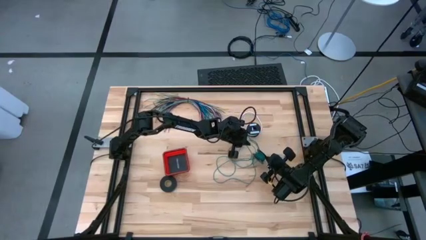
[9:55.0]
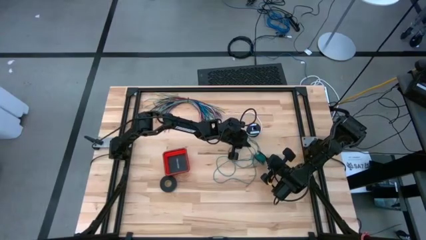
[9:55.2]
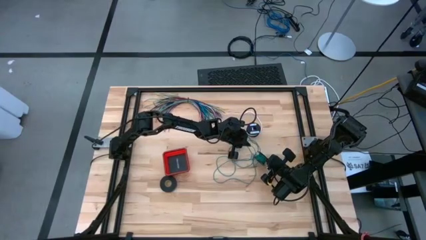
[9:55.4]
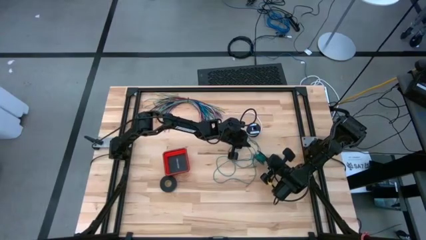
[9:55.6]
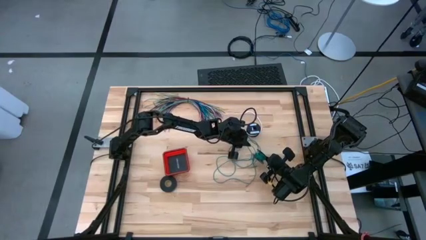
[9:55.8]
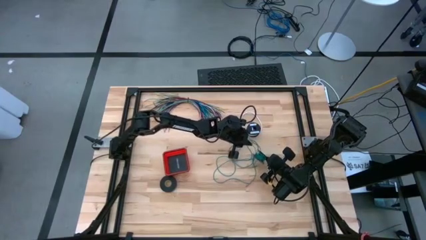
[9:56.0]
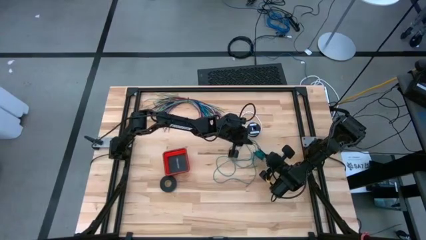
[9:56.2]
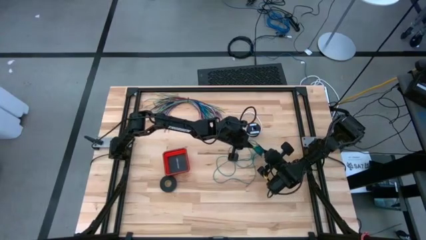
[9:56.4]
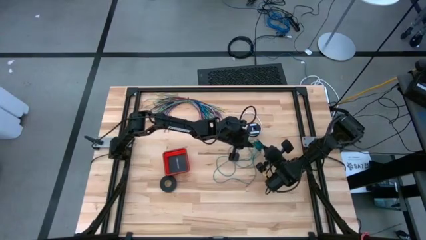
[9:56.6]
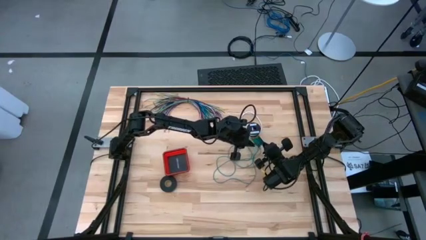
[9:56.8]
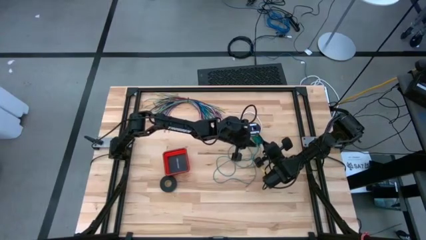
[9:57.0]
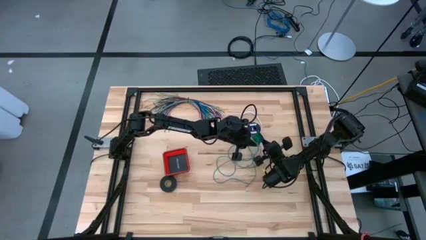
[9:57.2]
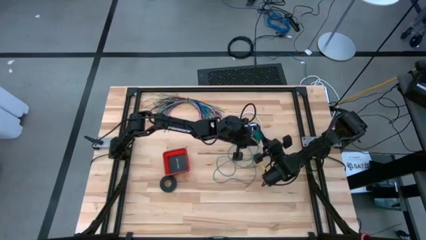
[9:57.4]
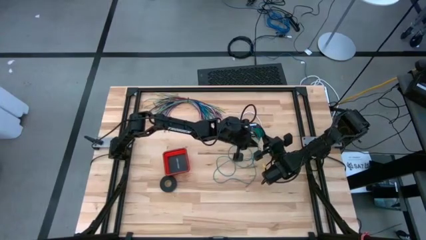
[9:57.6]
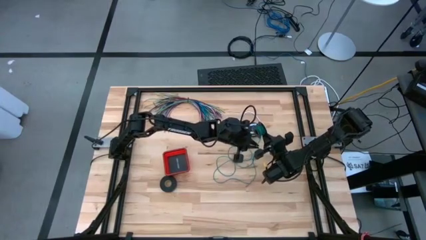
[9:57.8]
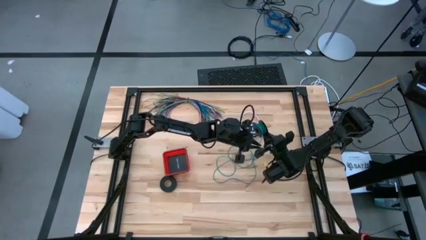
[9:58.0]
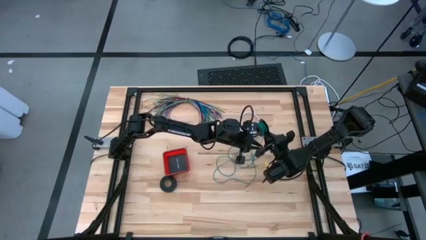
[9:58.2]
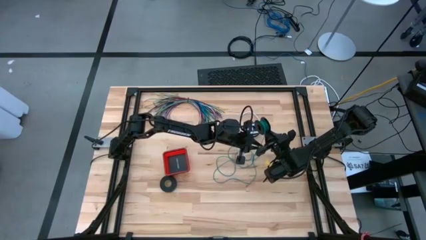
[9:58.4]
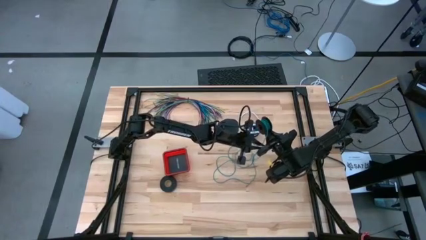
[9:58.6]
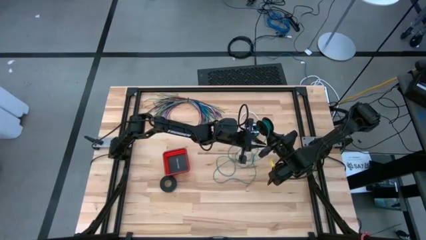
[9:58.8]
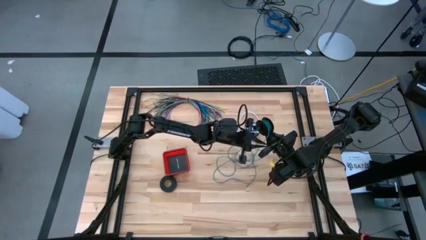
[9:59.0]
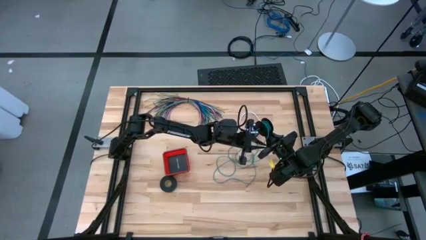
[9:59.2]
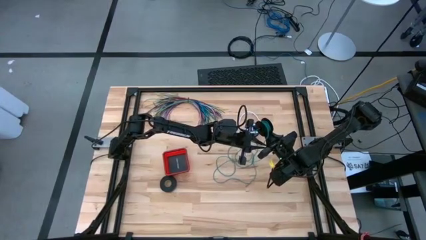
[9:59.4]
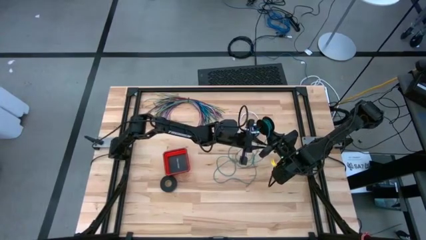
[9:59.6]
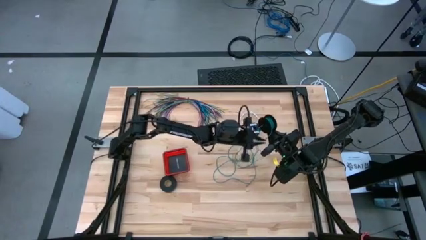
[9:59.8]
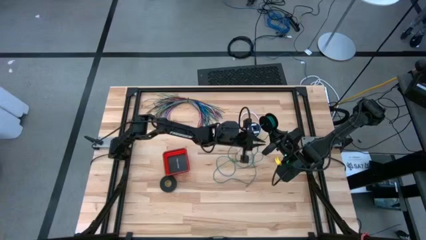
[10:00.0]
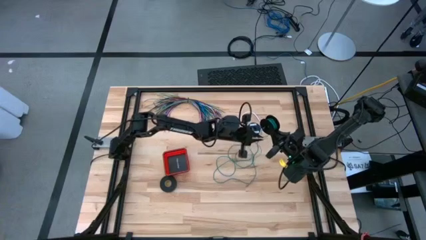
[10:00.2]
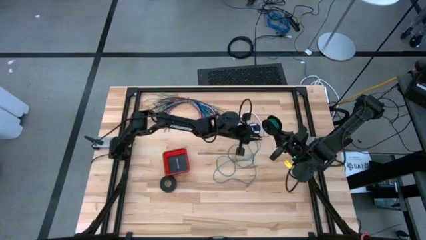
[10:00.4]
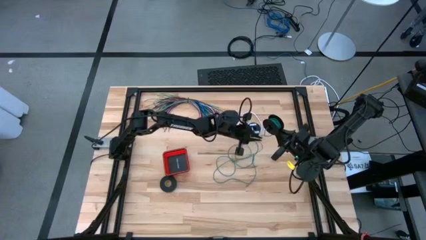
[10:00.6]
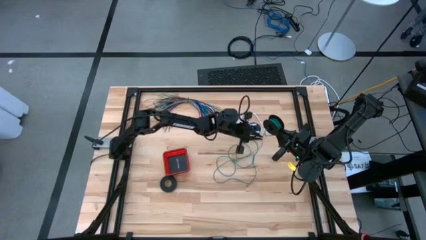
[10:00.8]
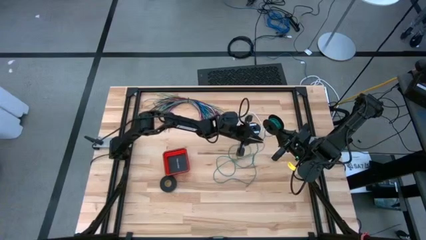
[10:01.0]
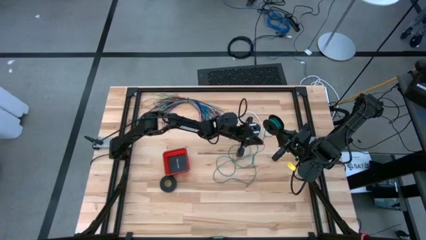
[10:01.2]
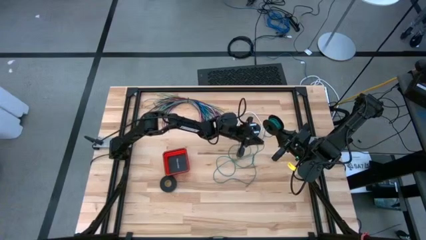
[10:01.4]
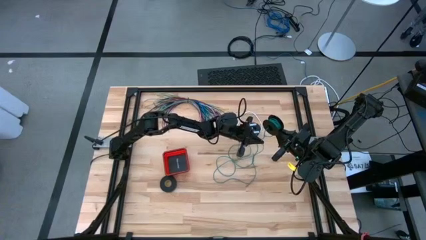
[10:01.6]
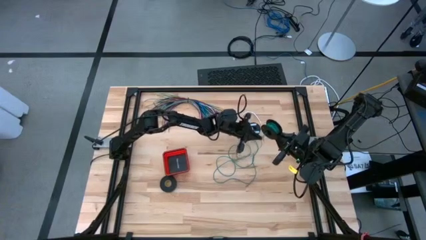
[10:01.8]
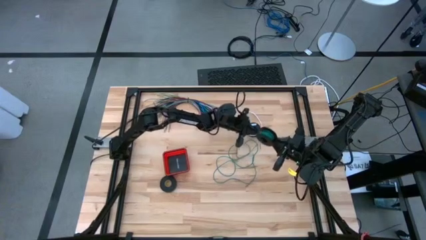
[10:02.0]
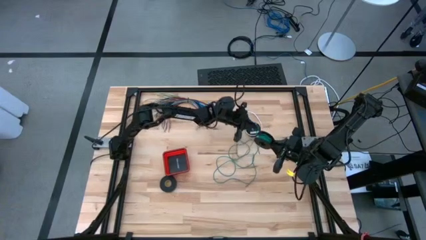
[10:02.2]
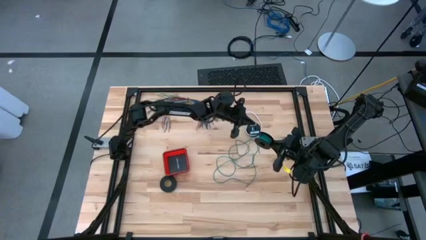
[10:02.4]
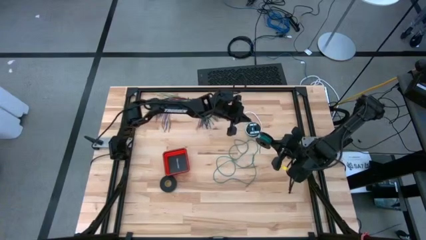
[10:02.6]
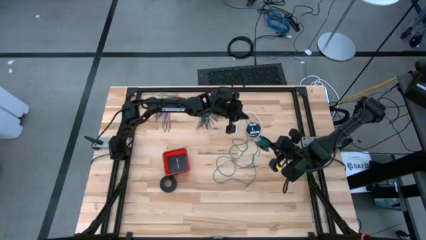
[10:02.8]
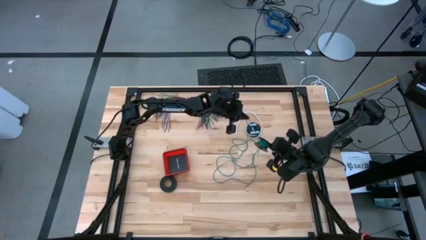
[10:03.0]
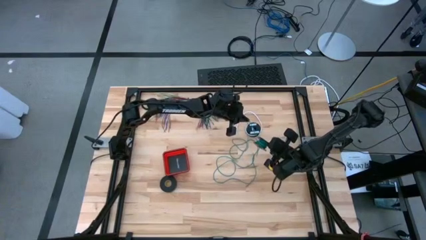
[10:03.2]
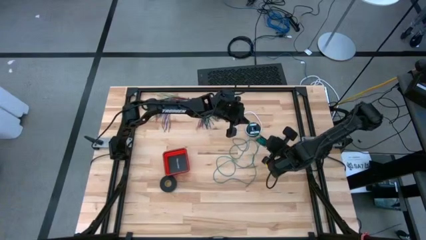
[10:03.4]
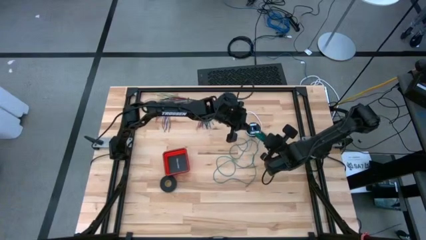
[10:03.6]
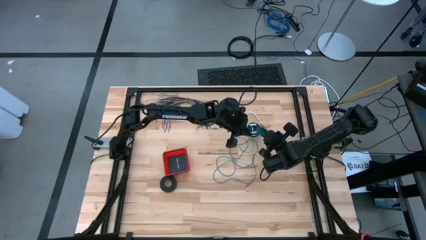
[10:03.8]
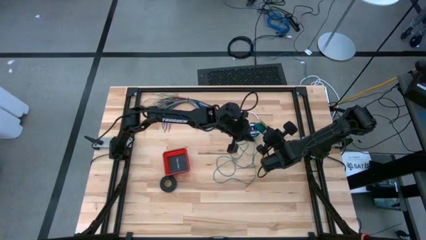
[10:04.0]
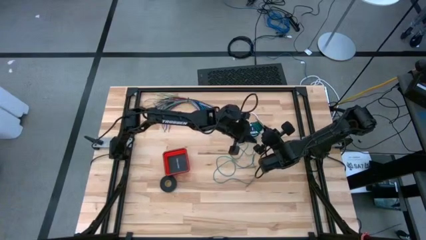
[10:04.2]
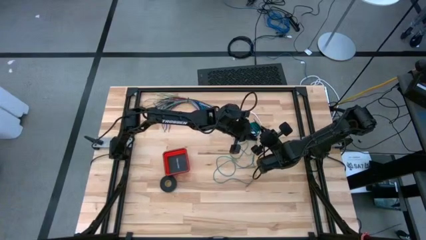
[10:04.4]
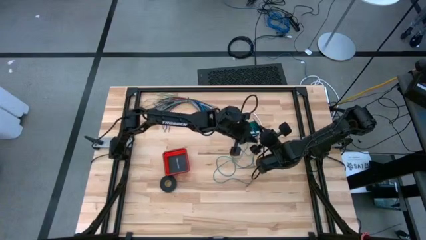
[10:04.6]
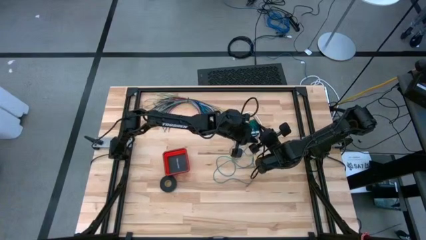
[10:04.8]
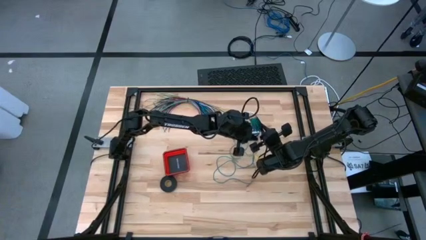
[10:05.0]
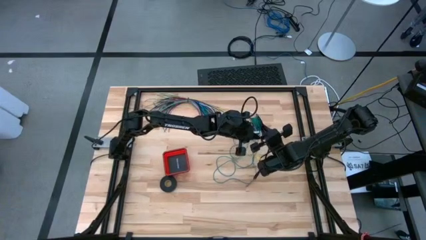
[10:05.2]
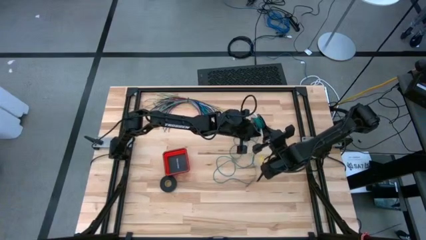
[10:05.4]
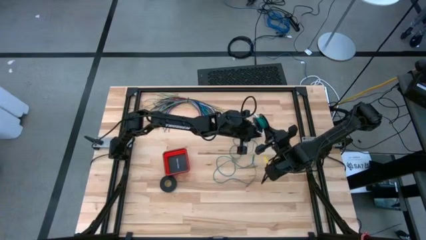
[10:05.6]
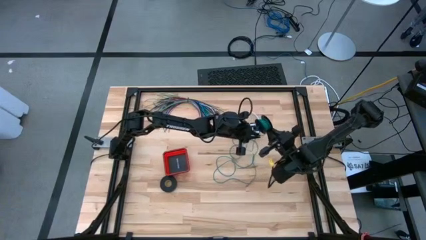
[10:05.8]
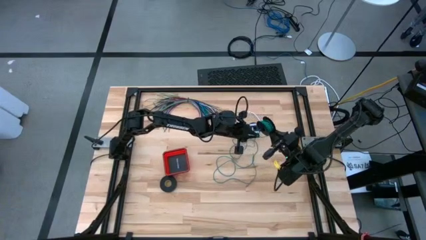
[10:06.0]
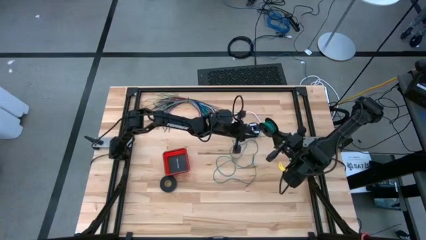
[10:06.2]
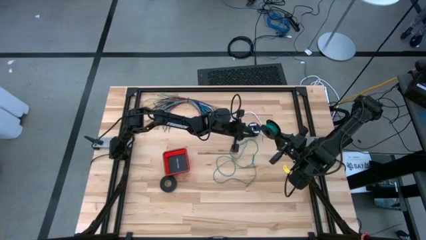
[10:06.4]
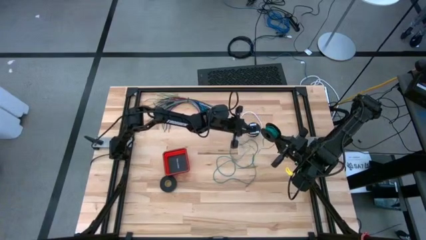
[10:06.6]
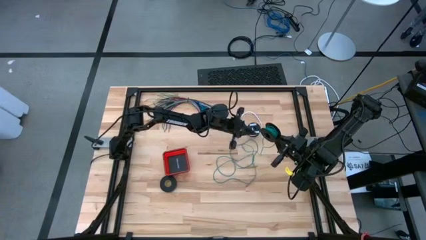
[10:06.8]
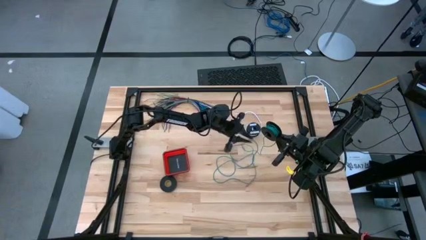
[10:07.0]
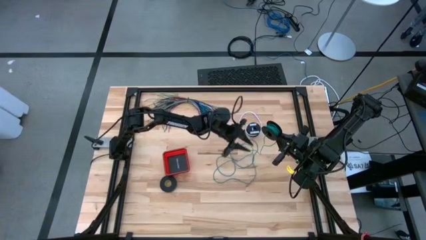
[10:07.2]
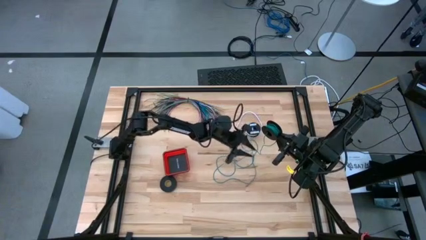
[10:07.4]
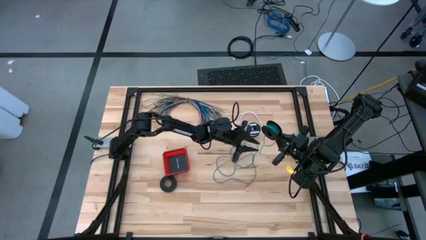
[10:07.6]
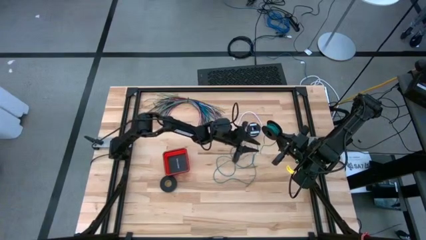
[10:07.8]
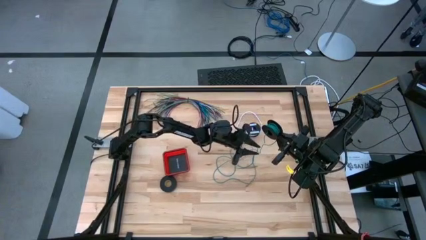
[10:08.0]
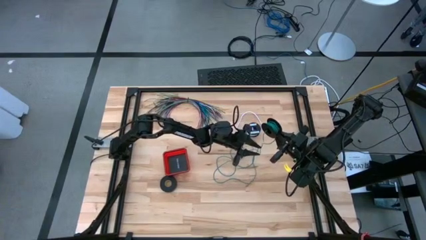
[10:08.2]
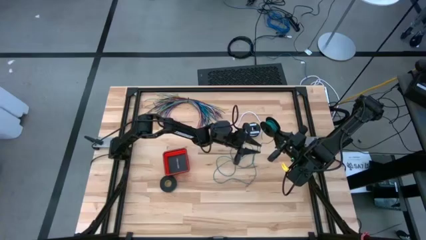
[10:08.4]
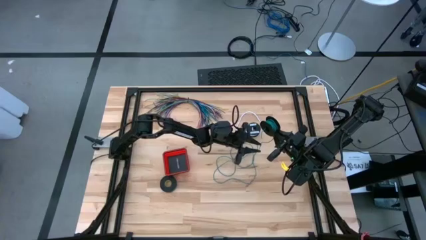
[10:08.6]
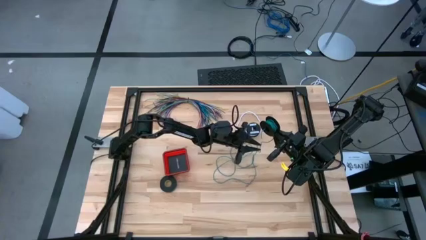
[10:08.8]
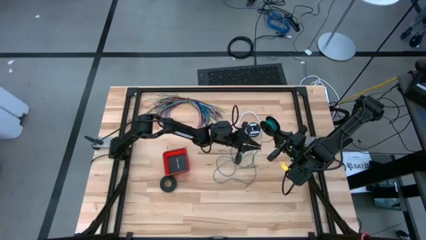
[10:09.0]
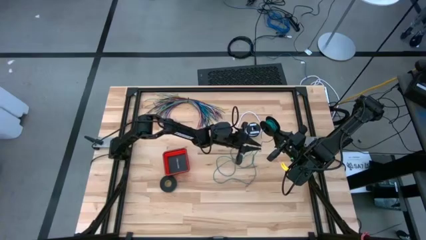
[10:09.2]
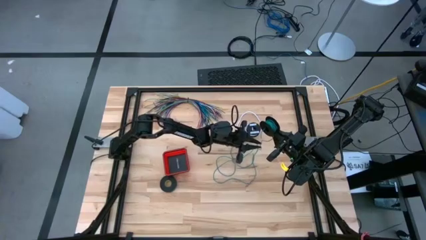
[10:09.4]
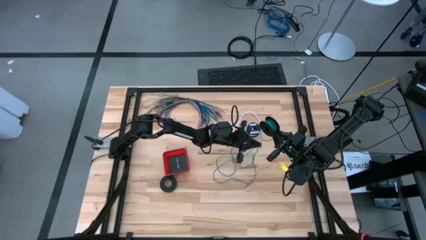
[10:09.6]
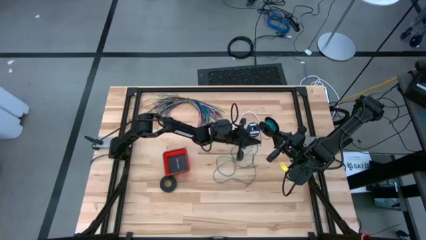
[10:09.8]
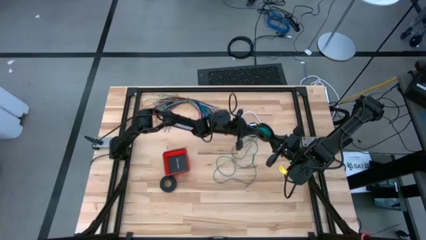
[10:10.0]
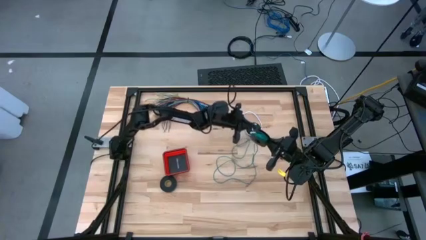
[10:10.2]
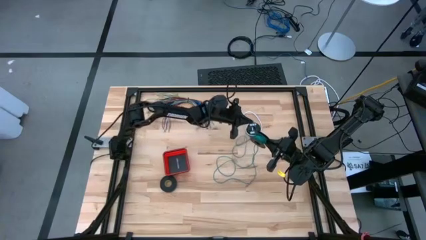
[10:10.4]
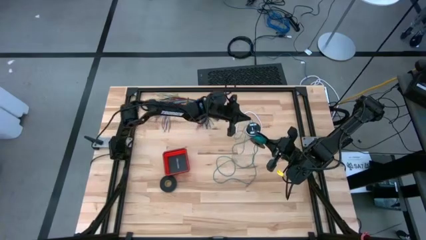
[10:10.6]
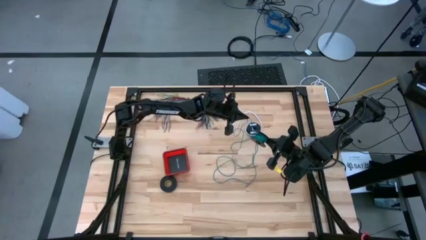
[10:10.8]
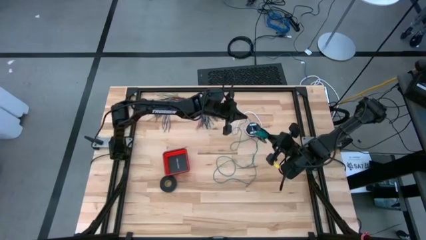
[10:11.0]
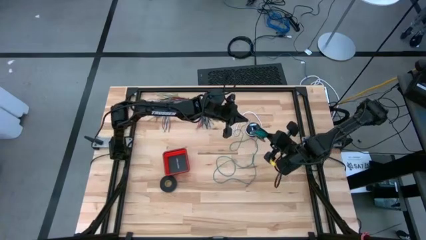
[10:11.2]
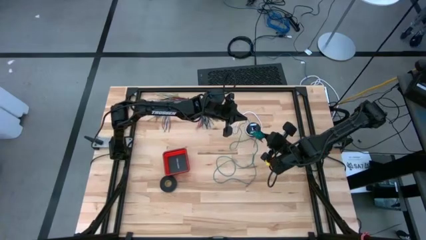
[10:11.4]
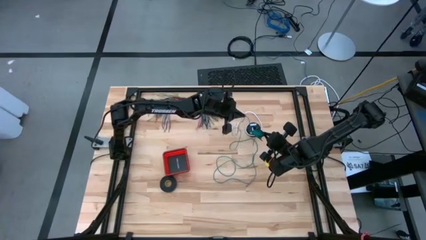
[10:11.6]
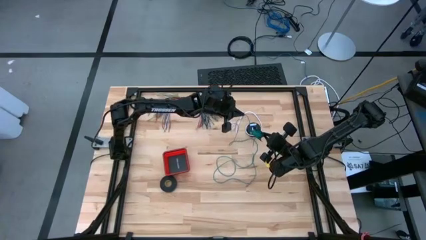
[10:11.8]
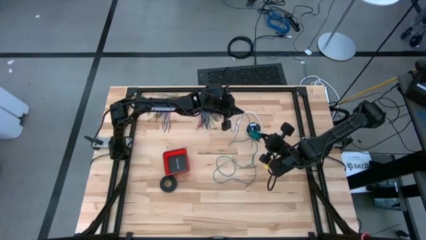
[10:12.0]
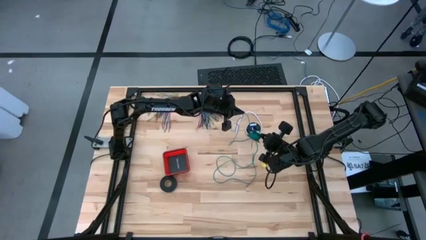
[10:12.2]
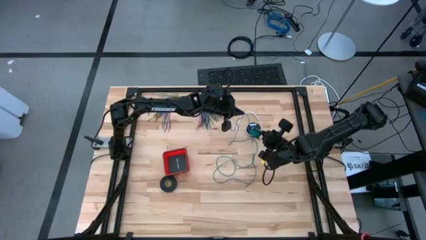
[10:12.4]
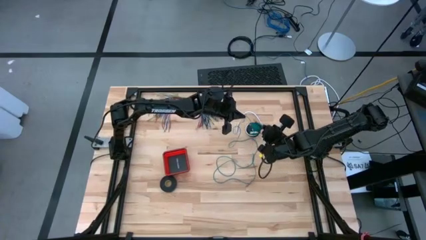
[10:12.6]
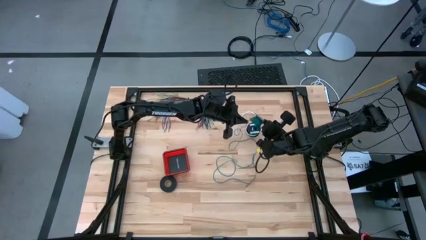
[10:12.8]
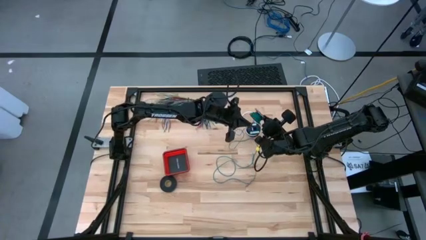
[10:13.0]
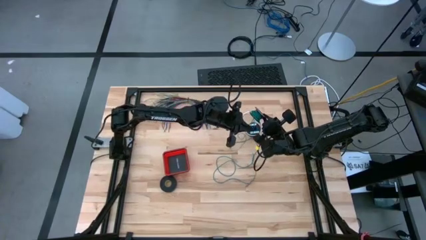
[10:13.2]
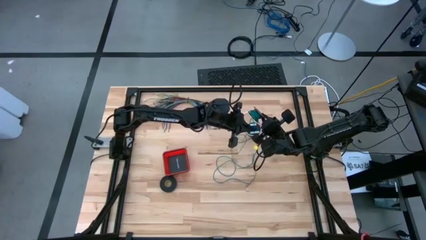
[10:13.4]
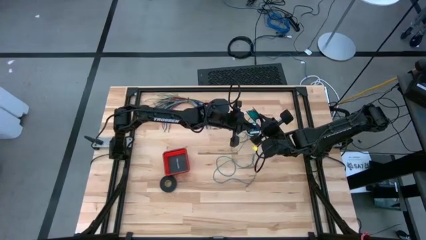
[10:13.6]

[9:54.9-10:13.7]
Task: Coil cords
Coil the green wire onto the spool
